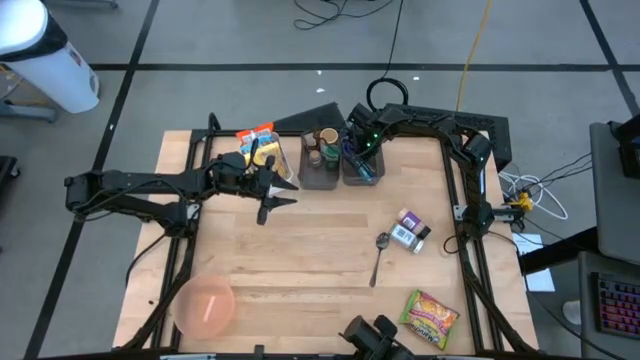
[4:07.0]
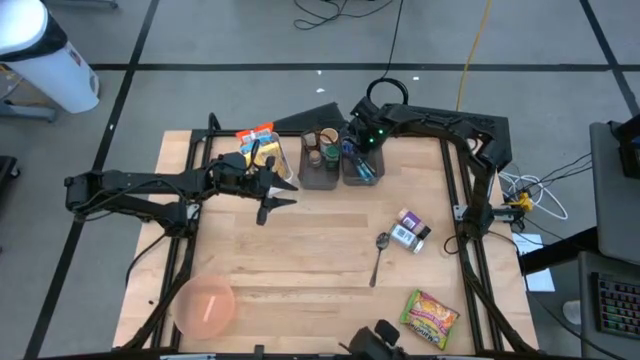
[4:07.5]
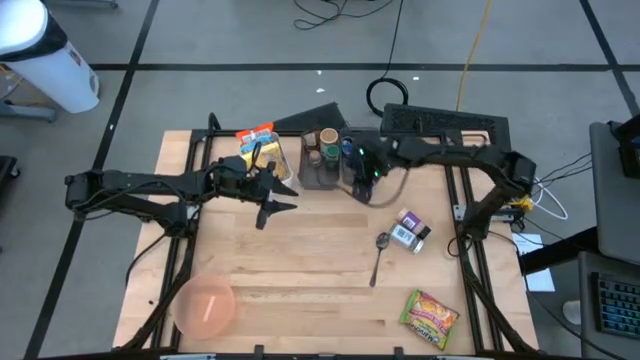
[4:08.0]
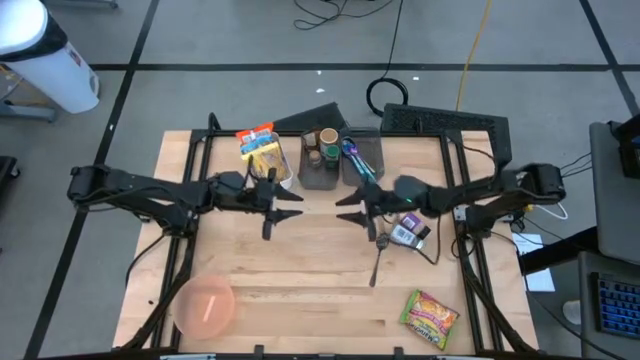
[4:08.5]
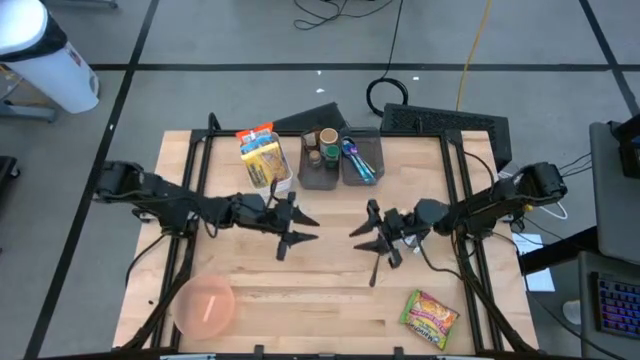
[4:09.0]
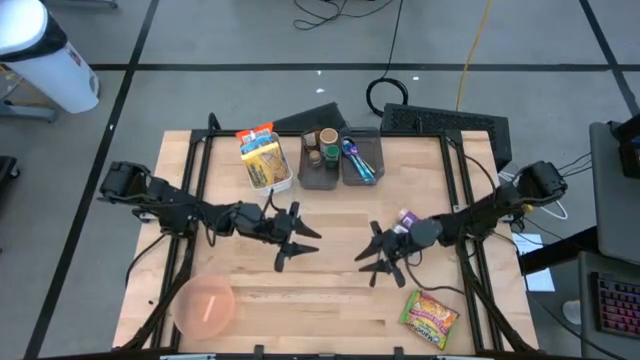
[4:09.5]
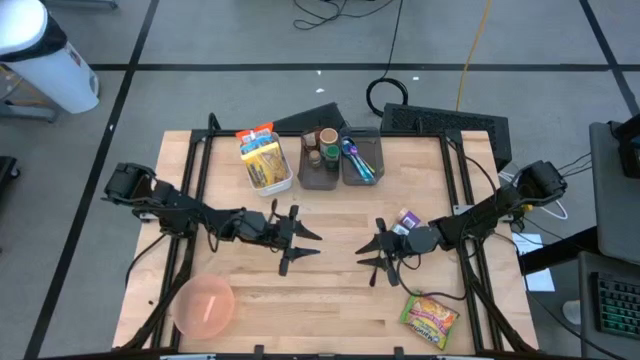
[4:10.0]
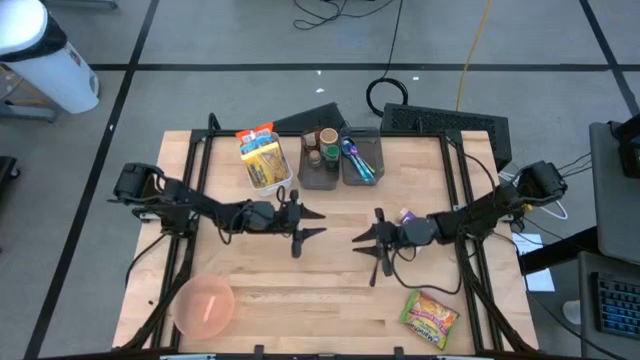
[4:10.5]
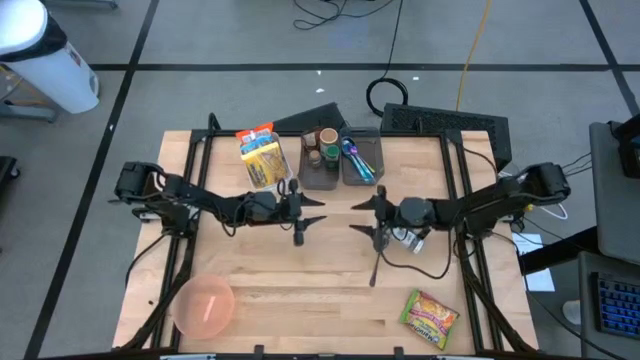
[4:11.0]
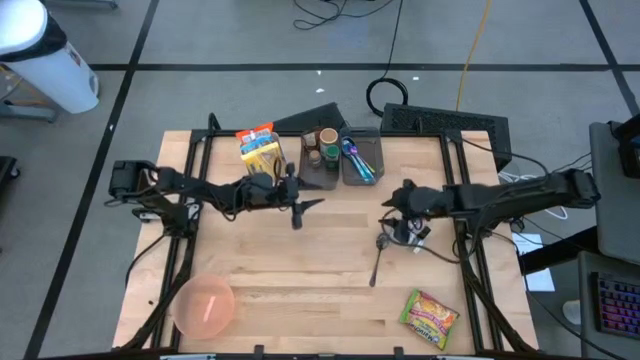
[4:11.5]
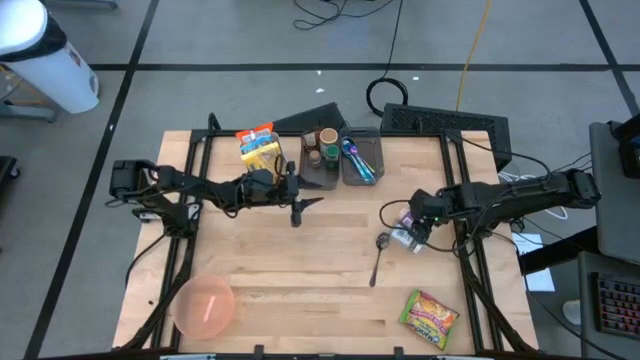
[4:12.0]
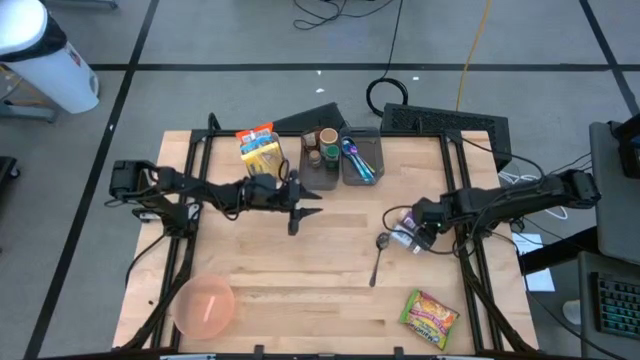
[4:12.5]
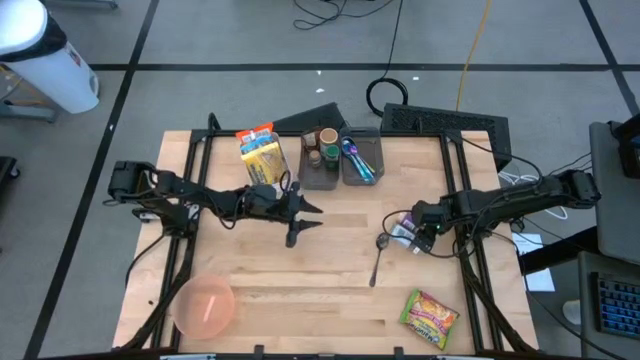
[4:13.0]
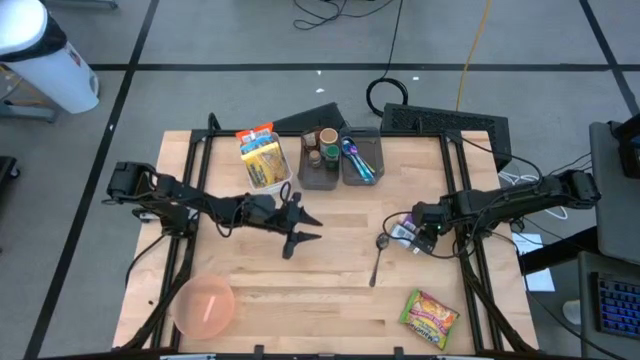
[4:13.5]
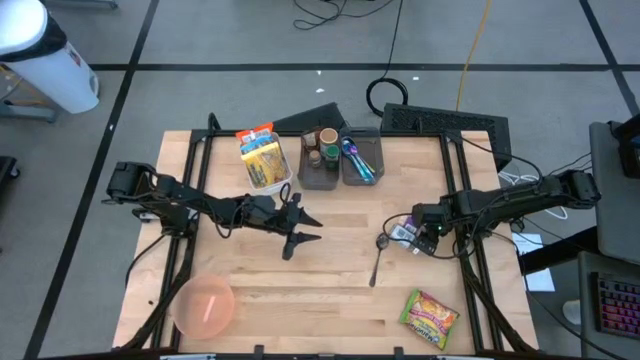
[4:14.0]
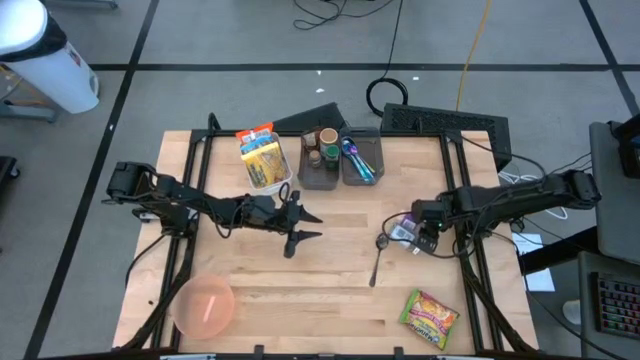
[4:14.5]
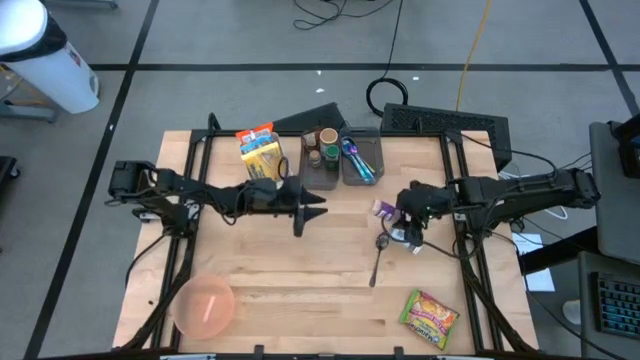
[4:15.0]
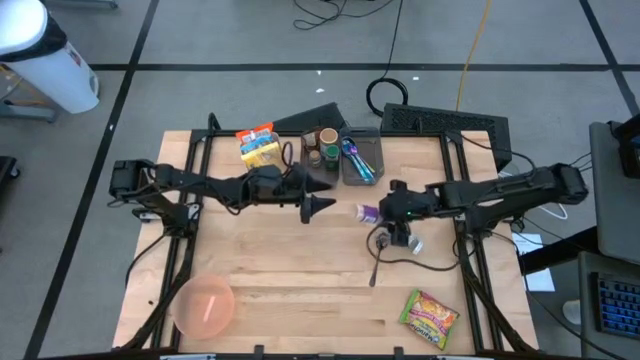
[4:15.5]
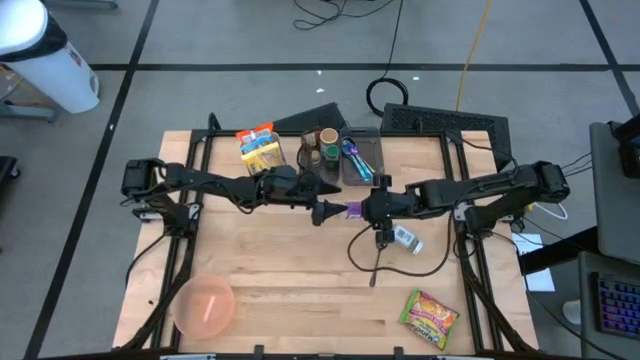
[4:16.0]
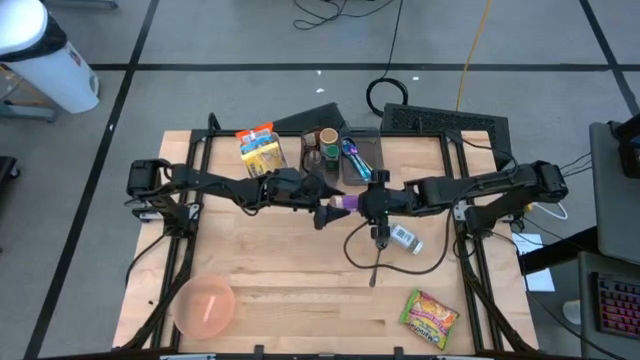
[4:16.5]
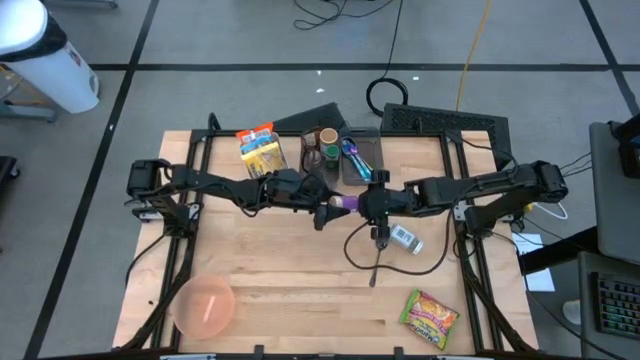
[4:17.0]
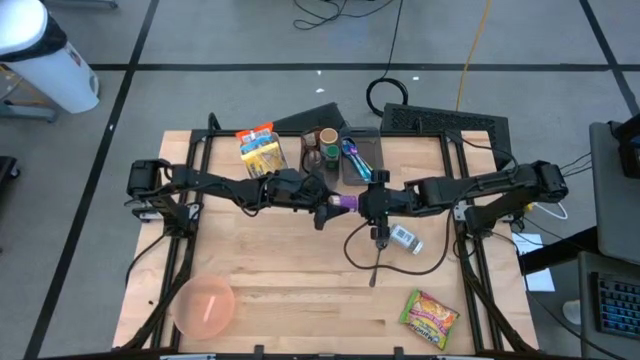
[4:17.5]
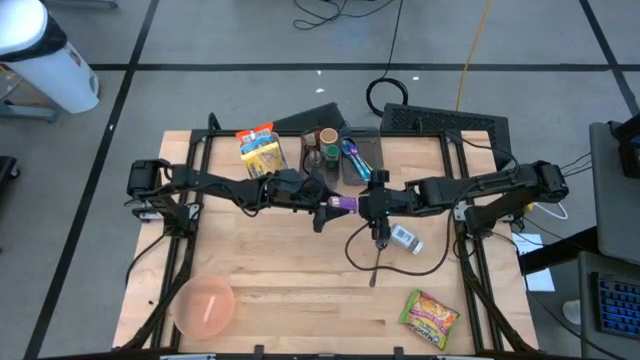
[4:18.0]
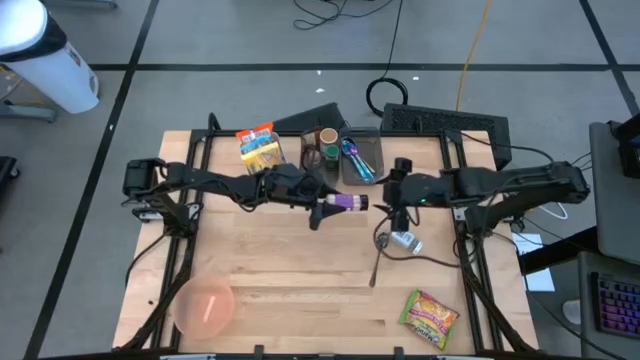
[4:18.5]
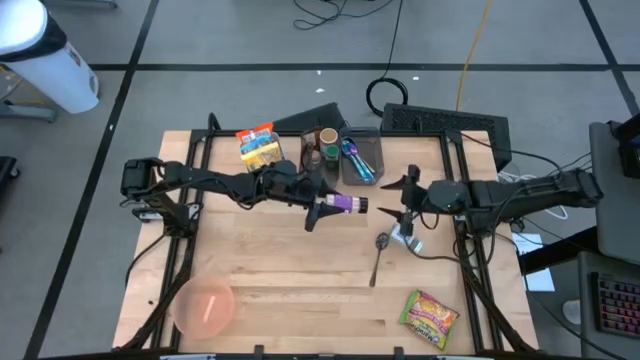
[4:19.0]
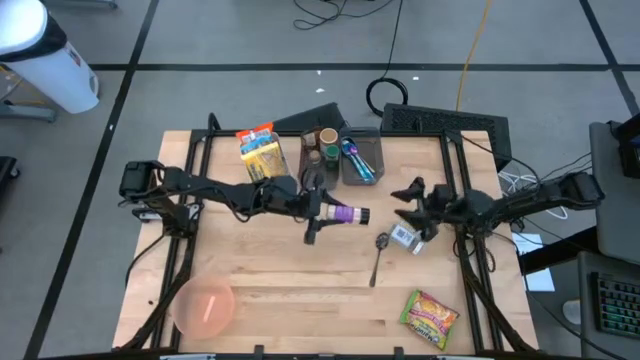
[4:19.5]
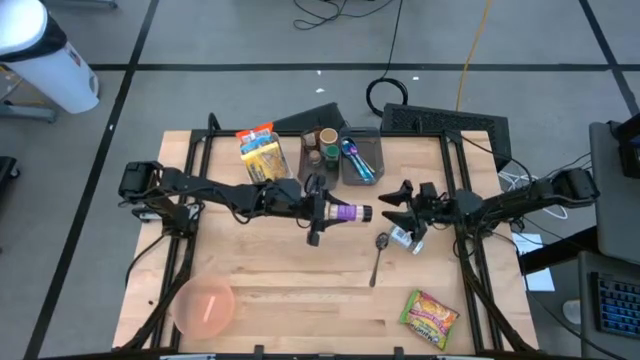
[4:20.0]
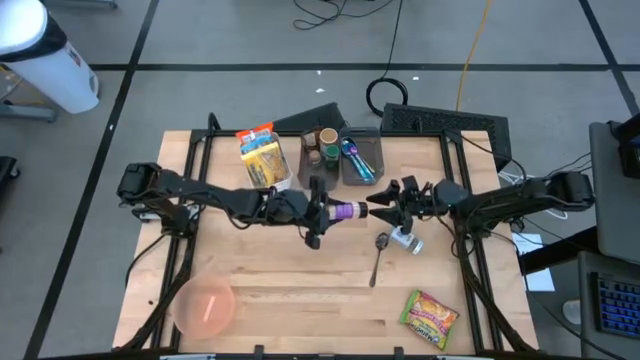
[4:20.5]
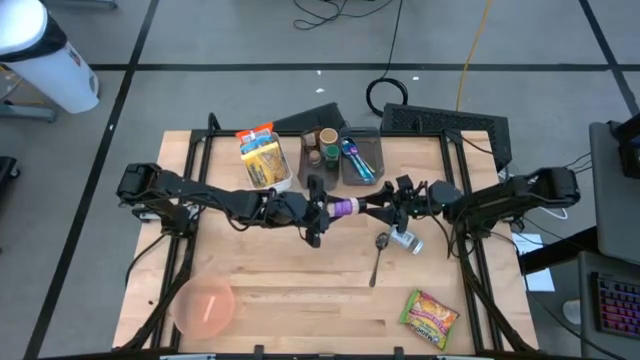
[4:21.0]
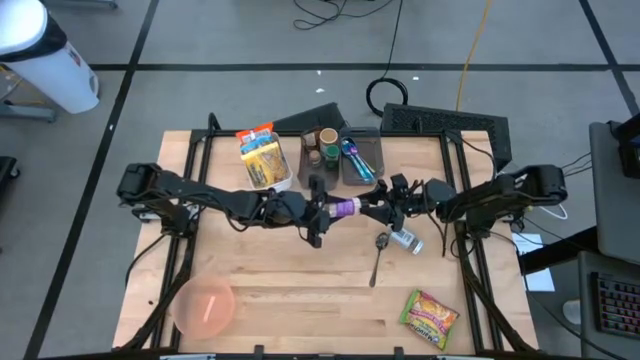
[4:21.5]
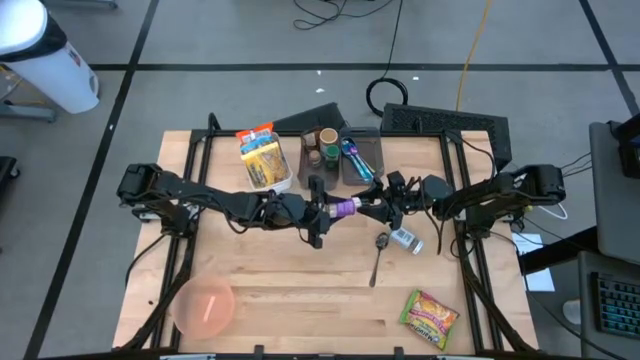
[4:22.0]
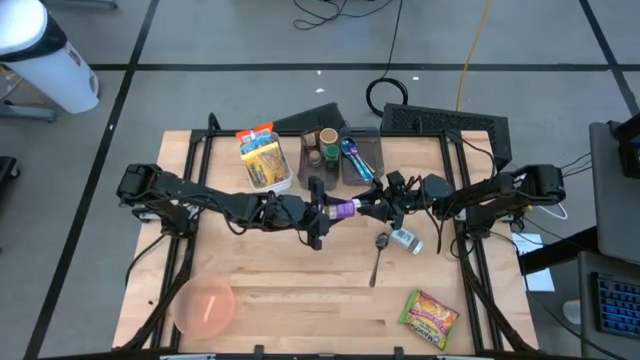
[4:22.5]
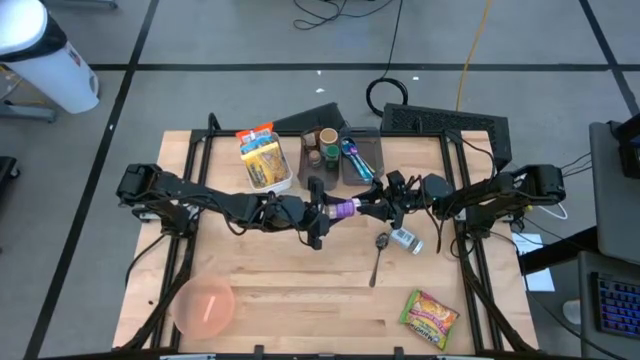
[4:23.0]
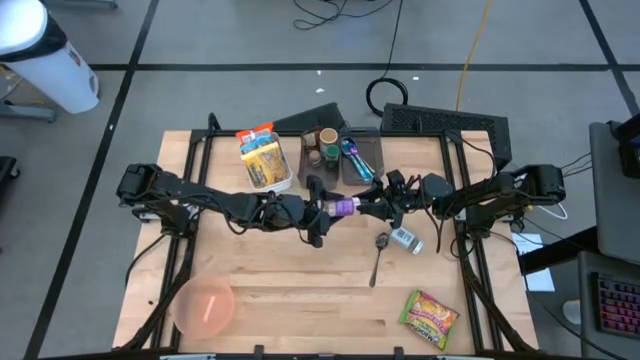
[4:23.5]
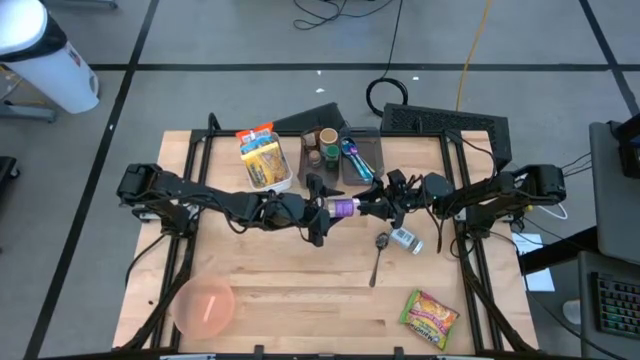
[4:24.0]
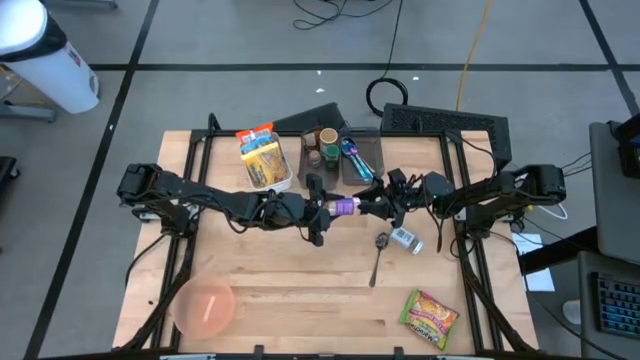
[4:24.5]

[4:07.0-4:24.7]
Task: Pick & Place Food Item
Put the purple seasoning bottle into the left black bin

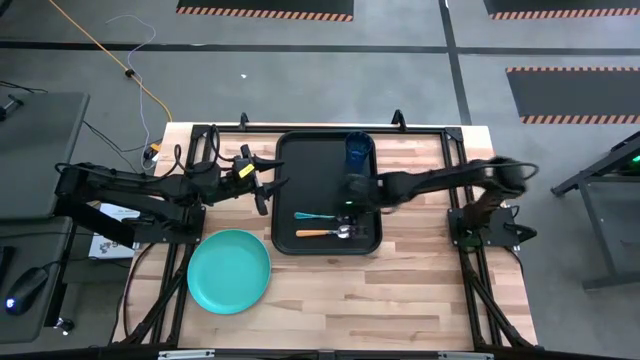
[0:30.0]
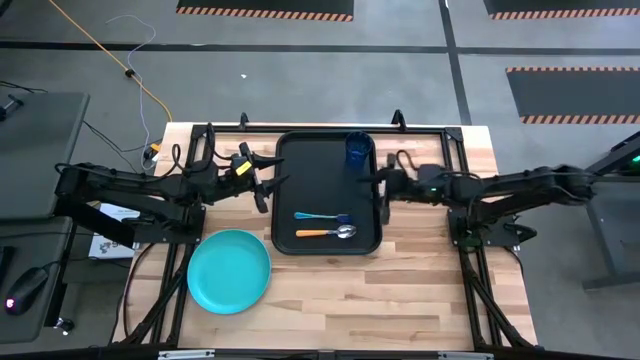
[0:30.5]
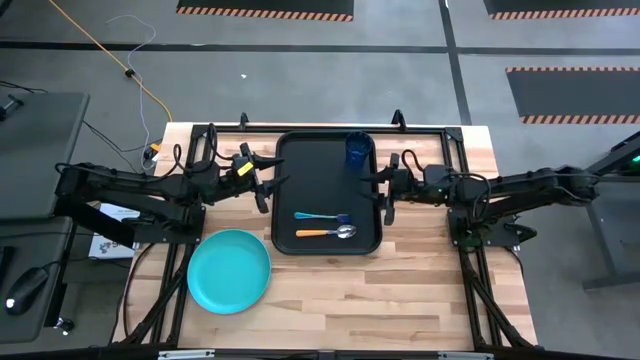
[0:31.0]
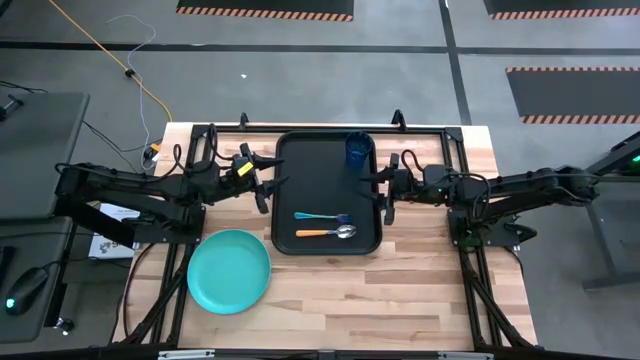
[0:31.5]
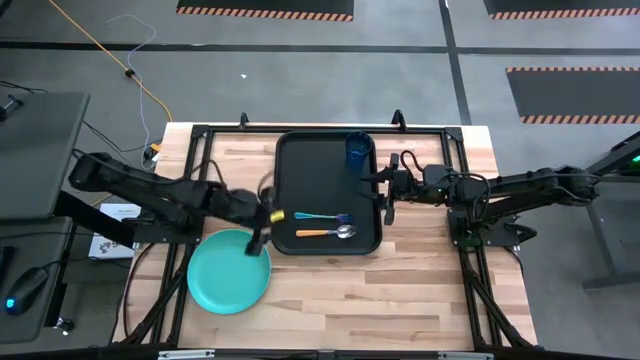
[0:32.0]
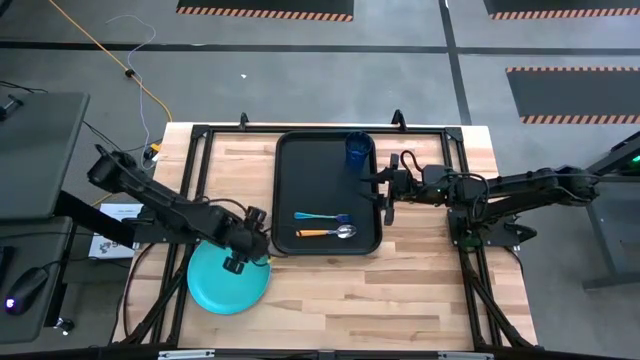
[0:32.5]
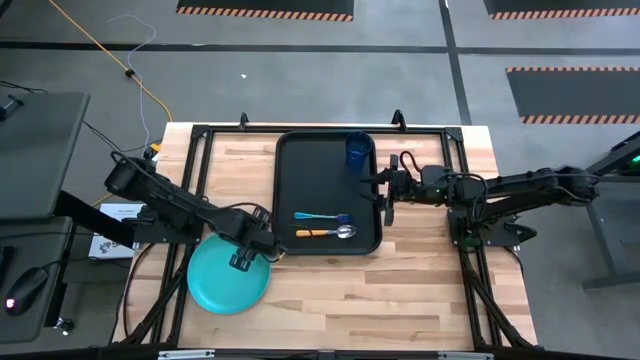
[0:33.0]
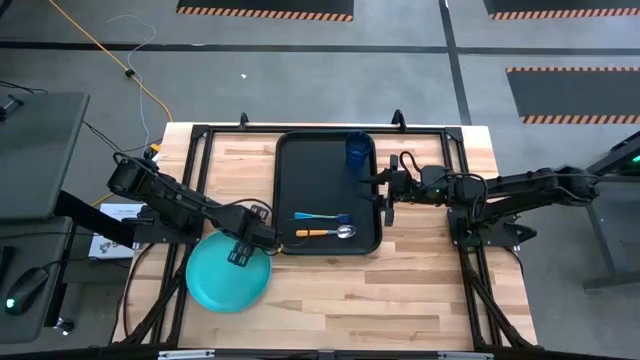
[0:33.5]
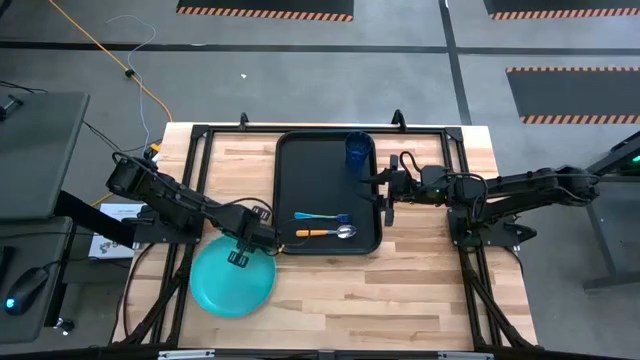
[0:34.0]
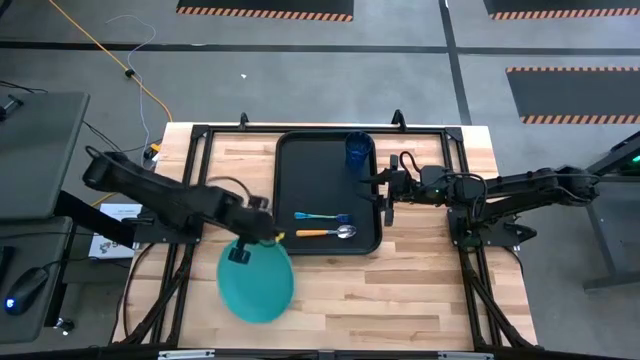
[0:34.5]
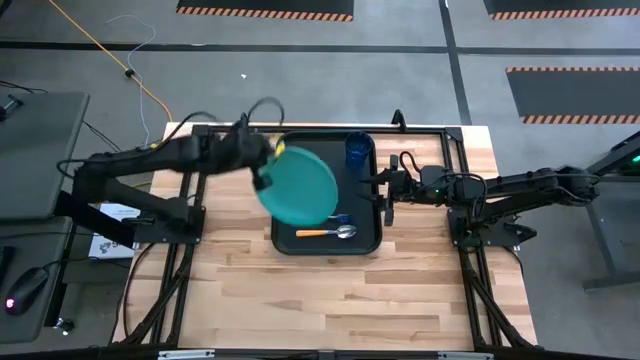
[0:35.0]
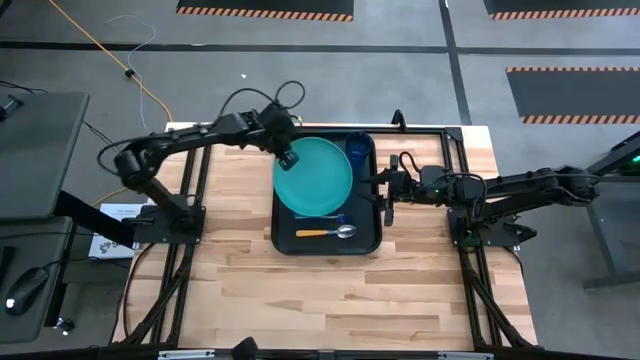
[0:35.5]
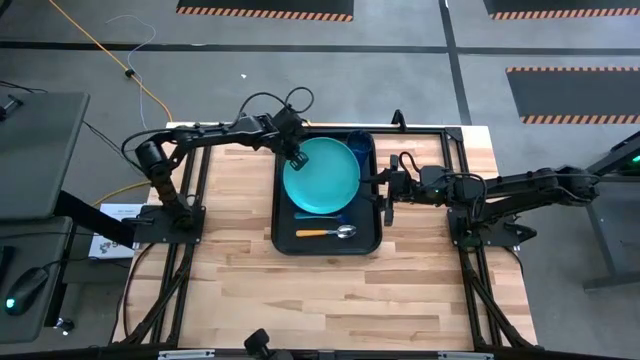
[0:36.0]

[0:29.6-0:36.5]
Task: Pick and place plate/cup/fork/spoon on tray
Put the light blue plate on the black tray
